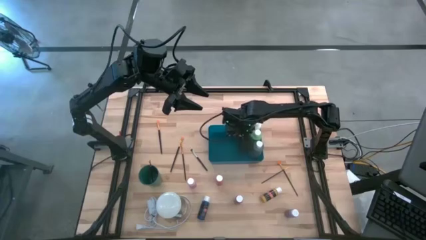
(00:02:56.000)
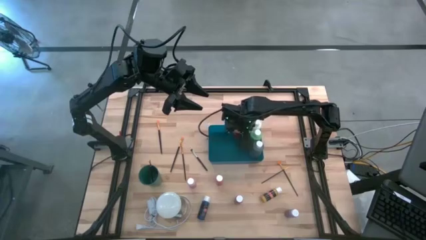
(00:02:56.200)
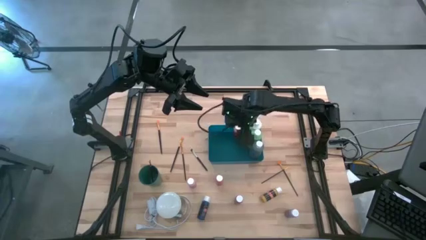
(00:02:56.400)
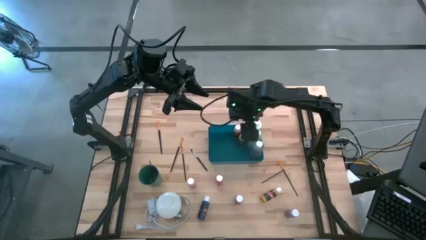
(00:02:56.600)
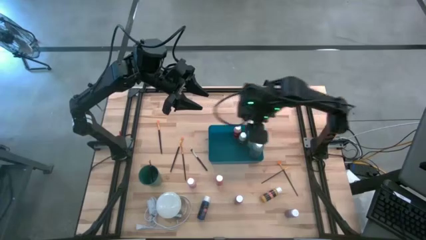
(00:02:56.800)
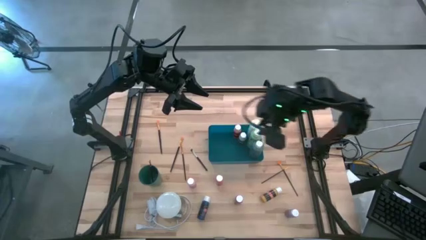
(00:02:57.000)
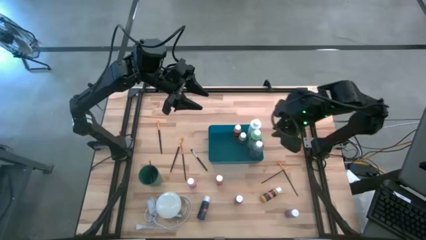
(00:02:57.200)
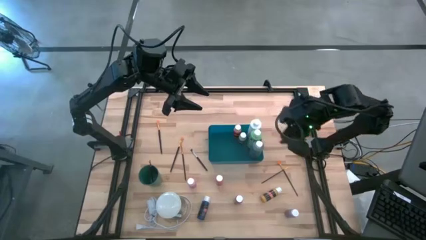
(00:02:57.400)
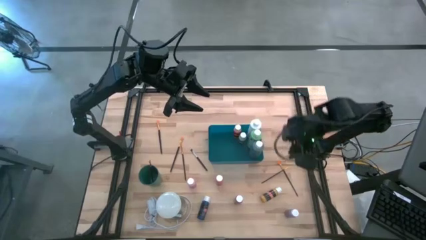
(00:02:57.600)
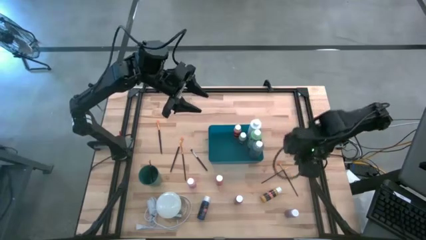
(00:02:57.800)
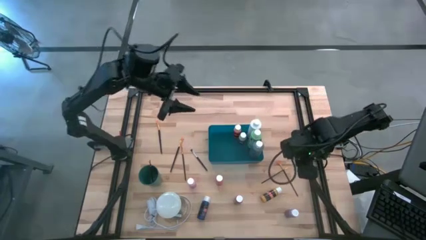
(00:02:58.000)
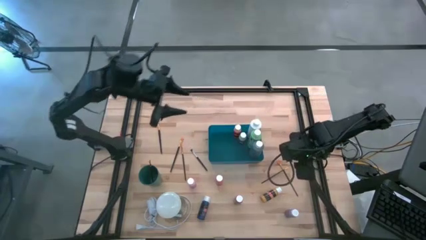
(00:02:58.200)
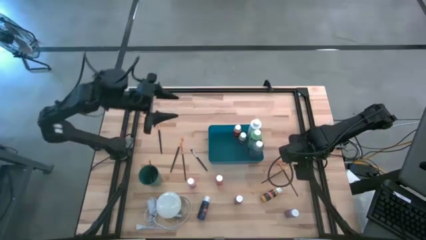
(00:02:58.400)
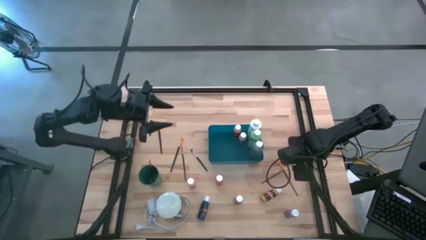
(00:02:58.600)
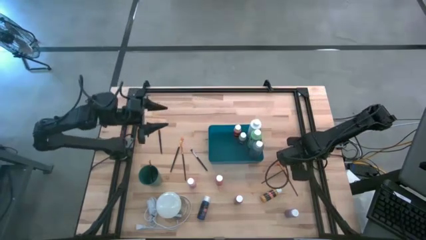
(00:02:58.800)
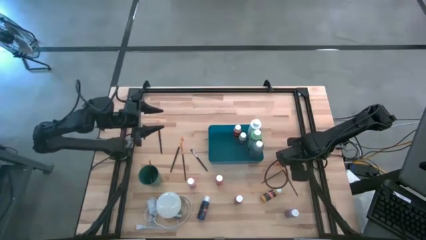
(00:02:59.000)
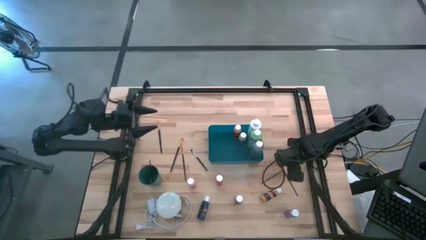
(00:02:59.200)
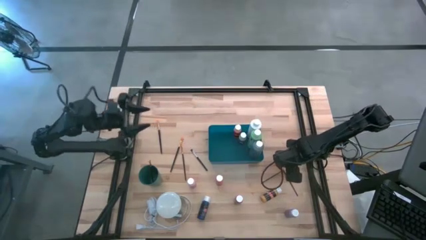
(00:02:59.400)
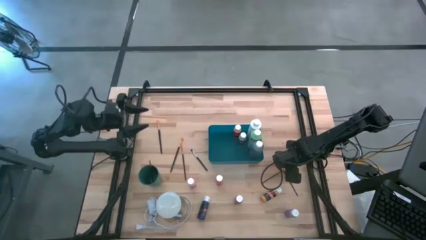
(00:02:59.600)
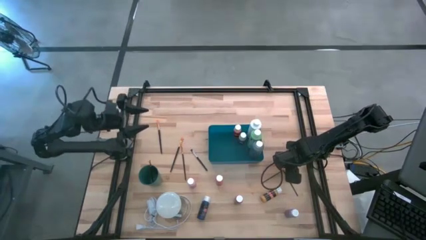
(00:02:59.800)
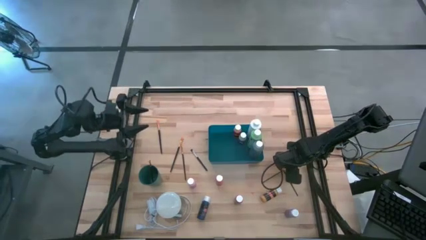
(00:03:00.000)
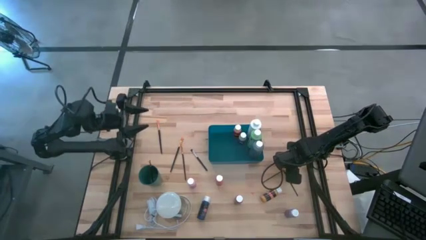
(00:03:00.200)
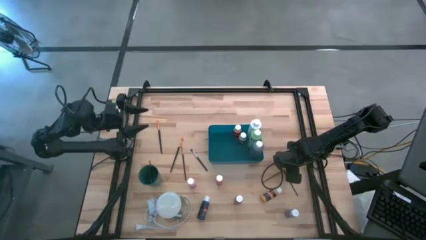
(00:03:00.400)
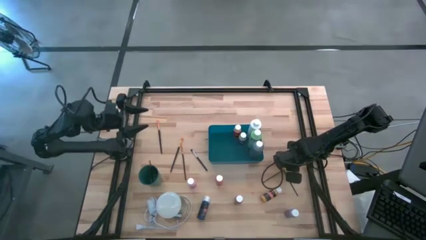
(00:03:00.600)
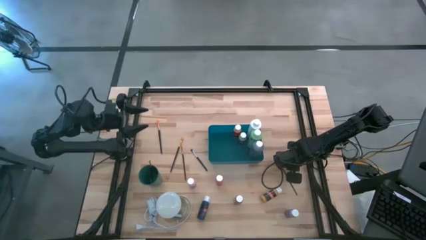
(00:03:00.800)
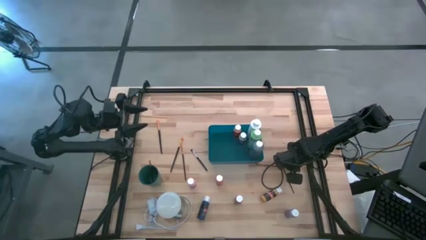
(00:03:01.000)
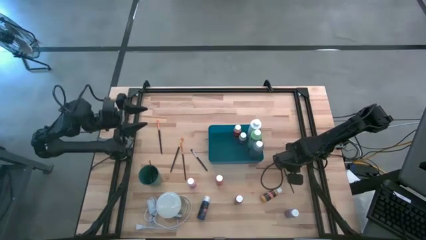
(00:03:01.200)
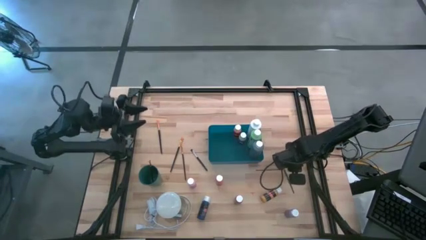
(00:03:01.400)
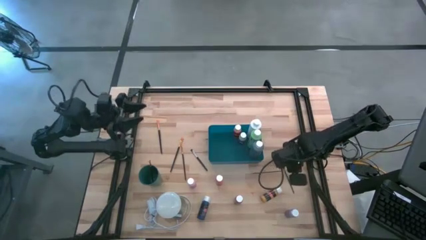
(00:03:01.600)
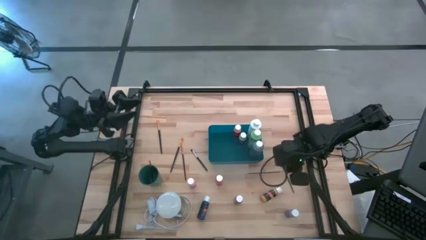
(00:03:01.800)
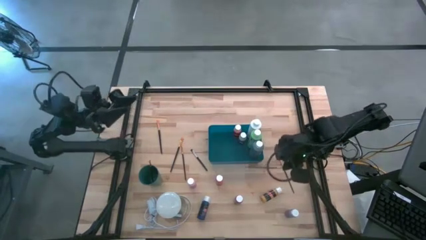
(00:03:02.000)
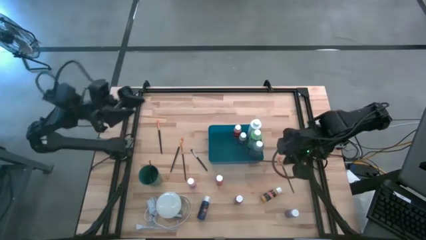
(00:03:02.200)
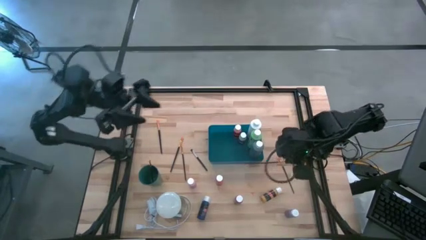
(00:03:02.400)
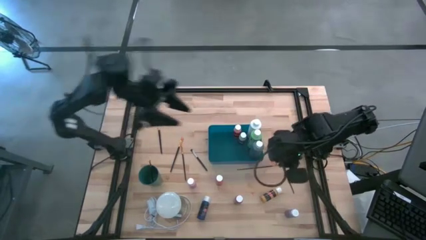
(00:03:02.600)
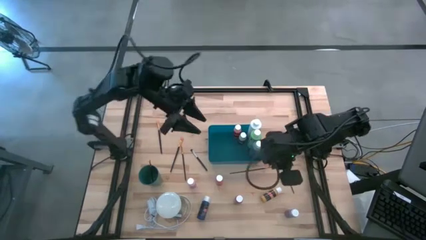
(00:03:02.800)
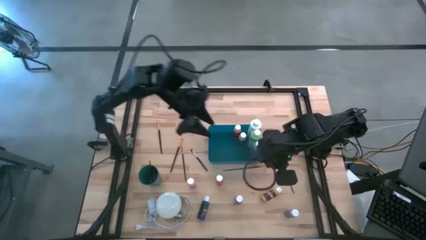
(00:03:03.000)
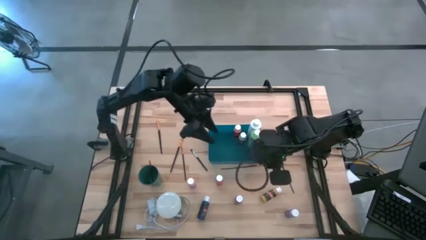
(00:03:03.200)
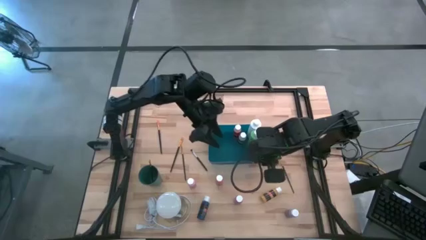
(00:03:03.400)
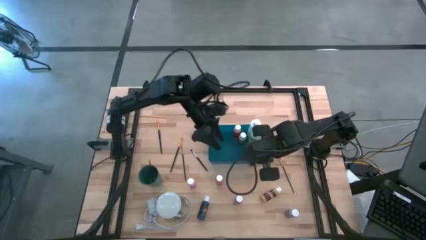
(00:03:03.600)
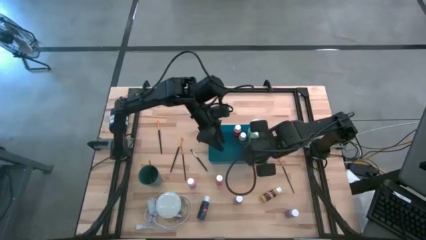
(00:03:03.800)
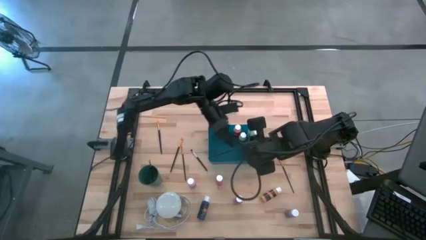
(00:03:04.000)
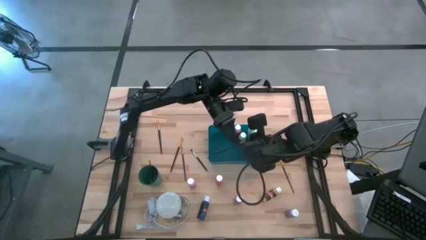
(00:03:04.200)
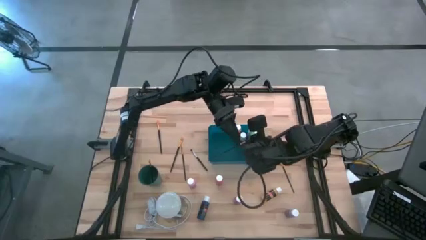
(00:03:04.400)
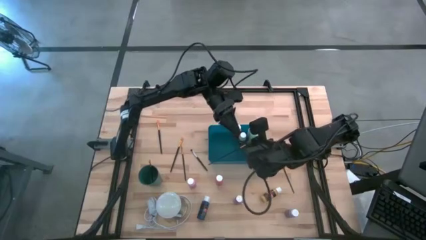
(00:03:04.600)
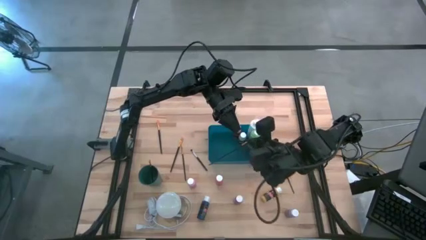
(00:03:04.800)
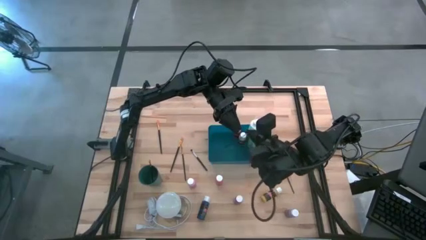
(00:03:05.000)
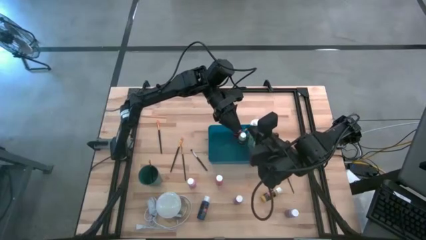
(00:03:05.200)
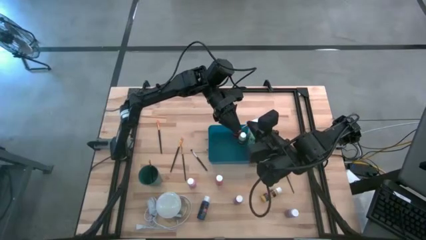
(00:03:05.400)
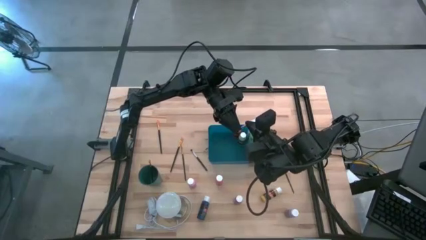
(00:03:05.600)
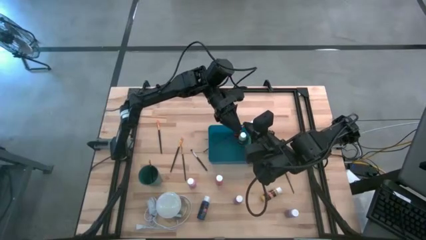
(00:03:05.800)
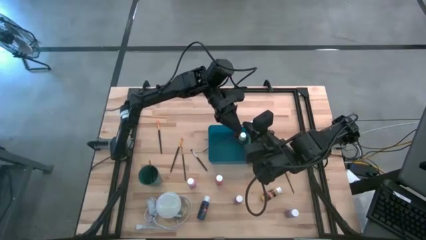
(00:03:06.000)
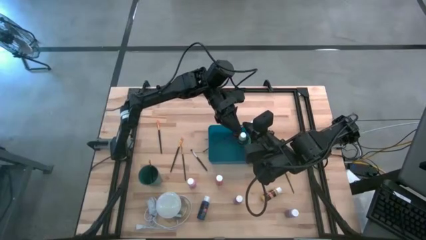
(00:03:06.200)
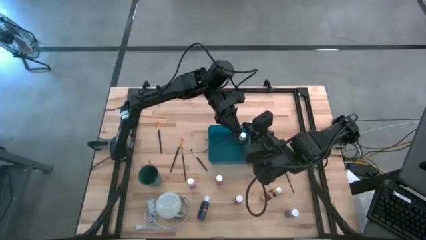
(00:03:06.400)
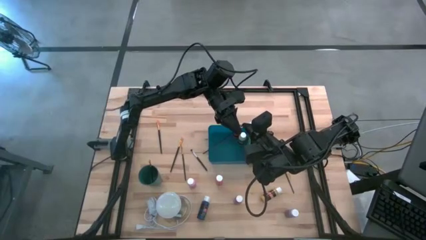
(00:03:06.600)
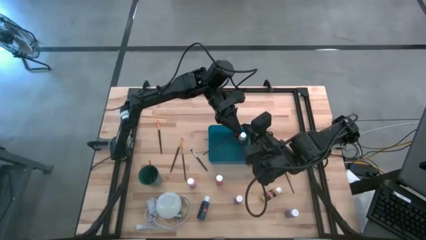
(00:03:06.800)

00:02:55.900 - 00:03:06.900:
Task: Pick & Place Paint Supplies
Put the gold paintbrush into the green cup

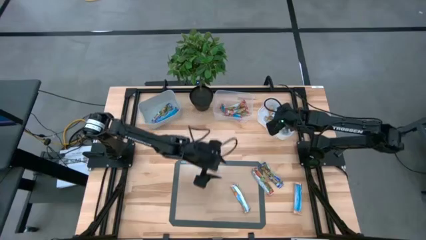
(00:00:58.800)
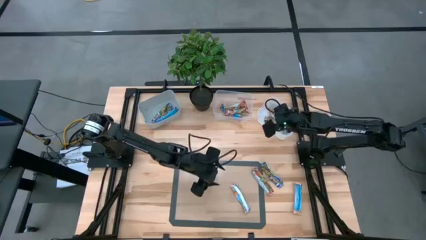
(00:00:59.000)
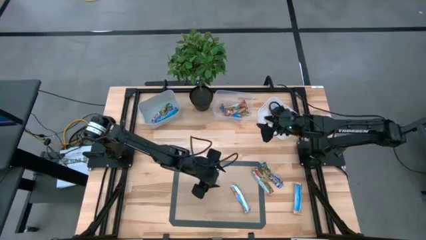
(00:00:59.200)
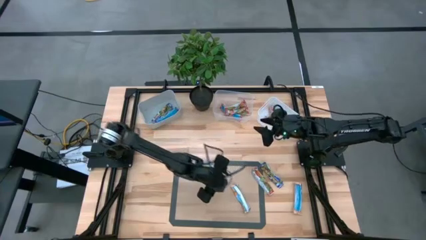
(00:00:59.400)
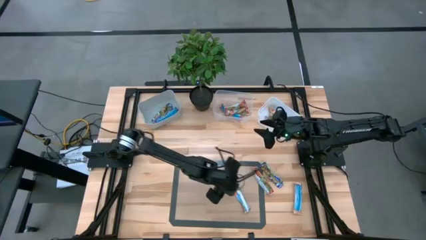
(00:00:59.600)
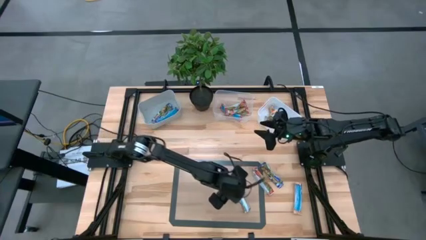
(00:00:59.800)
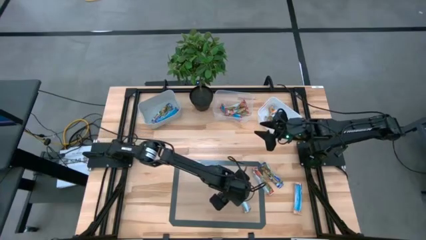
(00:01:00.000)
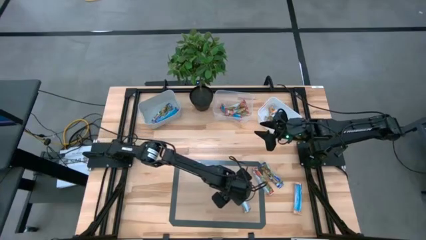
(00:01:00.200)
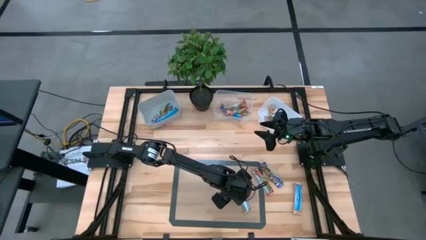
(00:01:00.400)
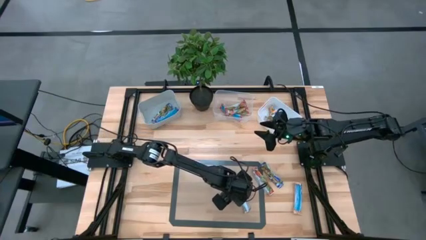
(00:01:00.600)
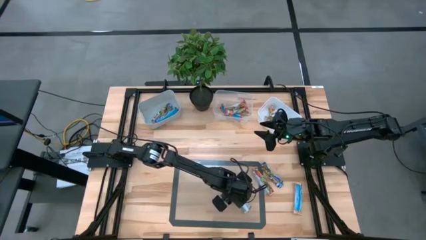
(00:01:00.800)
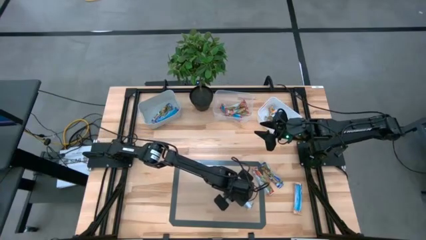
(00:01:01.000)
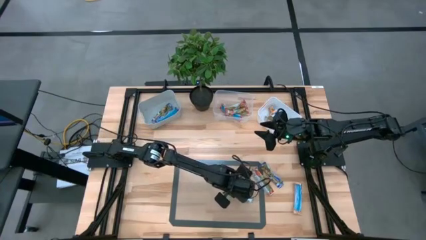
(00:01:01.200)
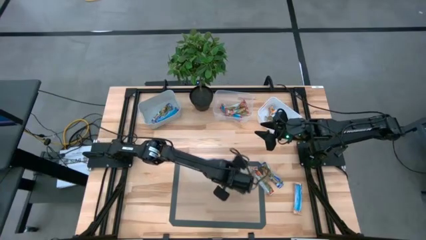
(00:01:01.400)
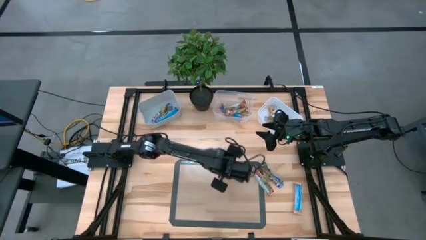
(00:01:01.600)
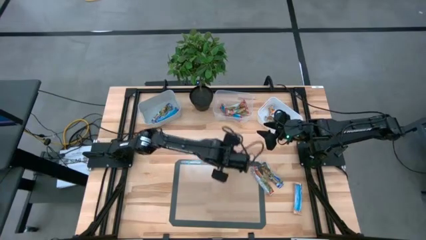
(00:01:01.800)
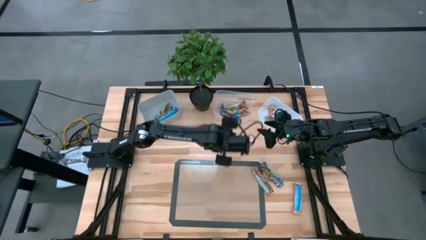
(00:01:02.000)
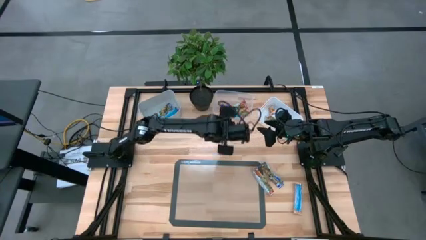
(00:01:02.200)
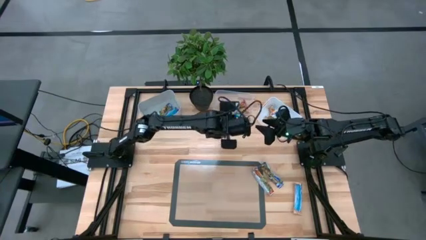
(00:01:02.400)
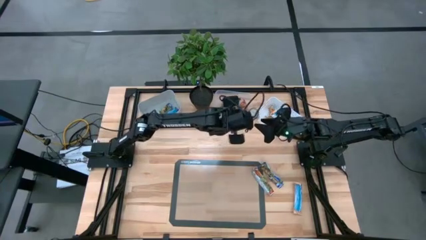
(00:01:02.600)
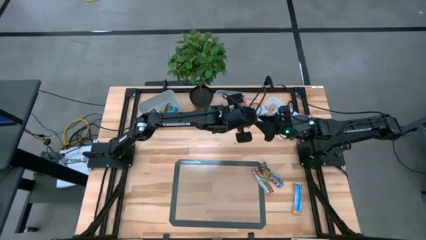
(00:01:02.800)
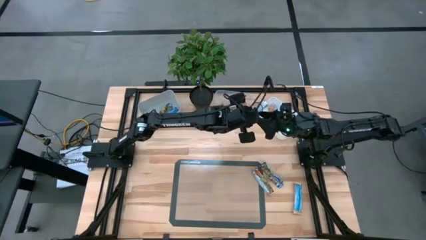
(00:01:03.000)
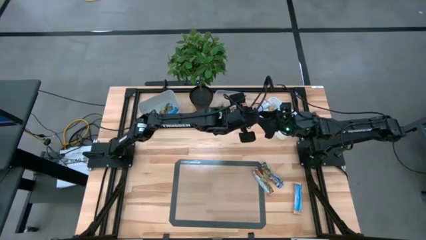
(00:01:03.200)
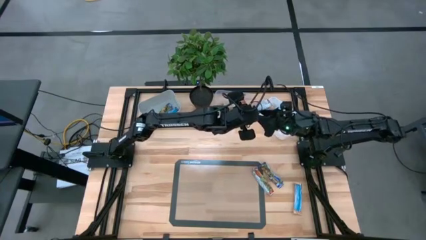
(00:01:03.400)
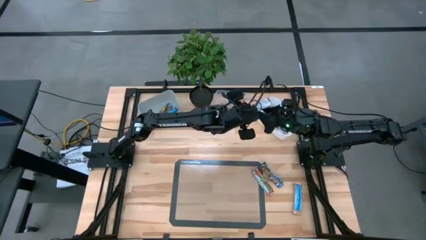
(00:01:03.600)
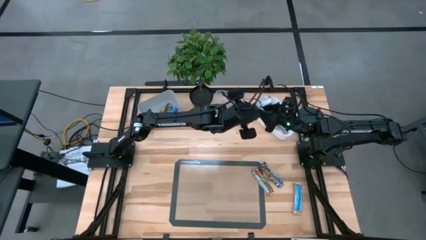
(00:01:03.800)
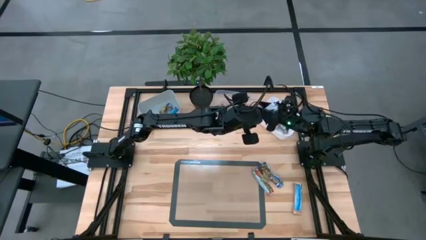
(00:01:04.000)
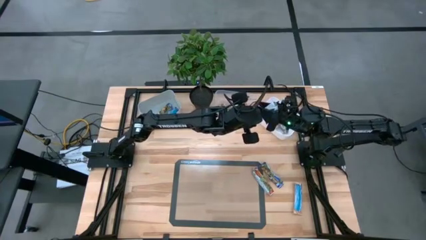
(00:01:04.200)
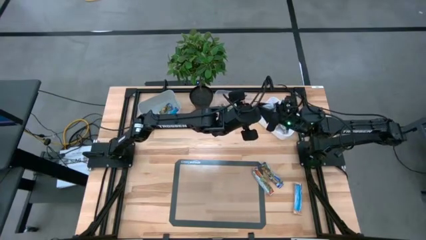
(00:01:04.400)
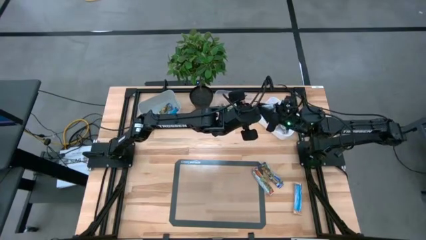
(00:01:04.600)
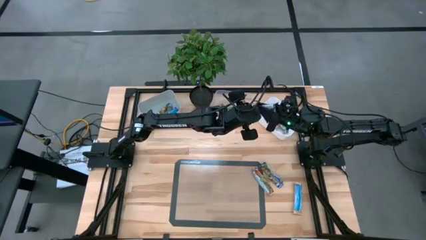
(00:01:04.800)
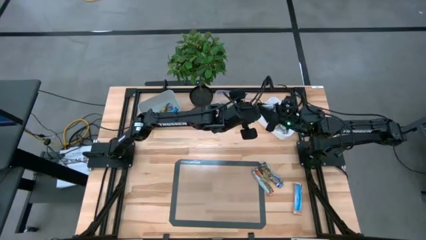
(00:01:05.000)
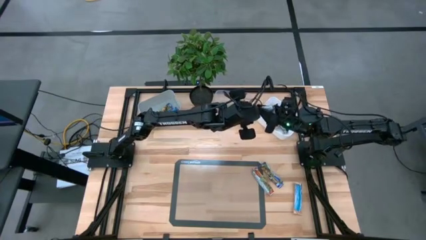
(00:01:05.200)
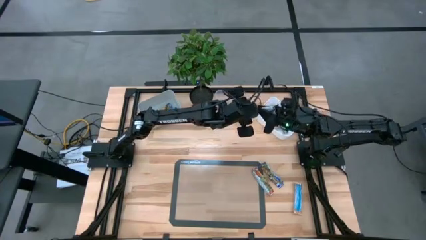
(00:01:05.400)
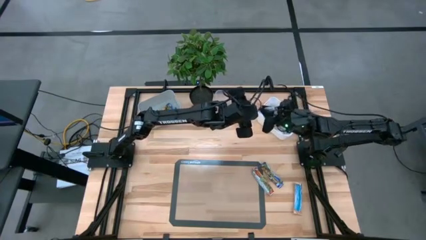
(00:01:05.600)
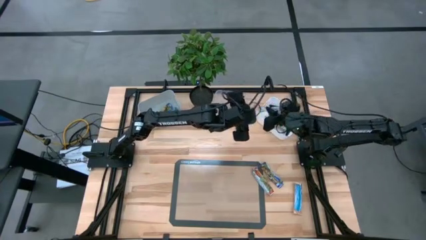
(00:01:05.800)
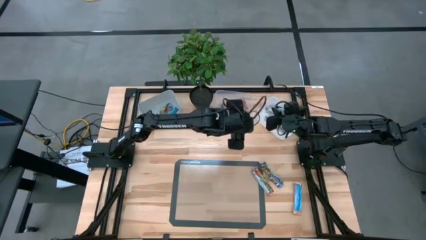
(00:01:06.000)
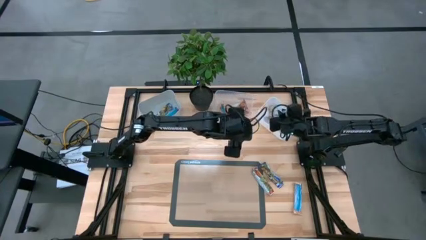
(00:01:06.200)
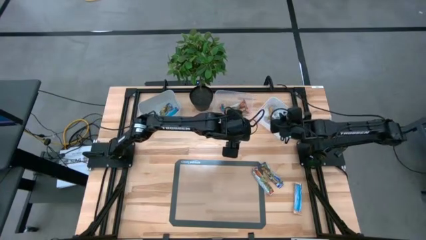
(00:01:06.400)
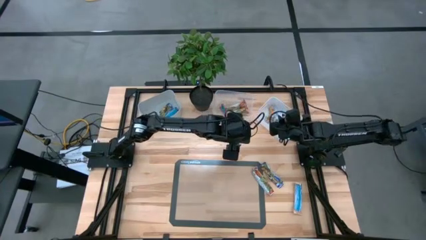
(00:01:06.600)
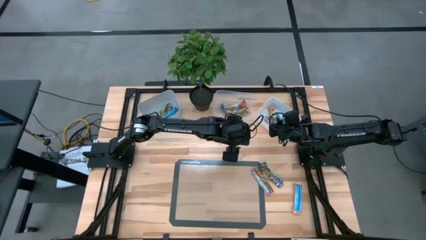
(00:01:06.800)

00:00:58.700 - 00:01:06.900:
Task: Pick and place Granola Bars by type
Put the yellow granola bar into the white bin
